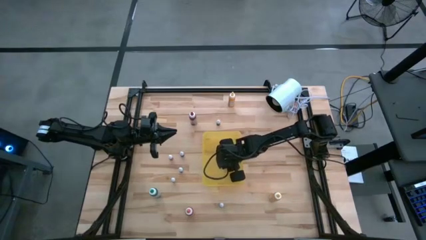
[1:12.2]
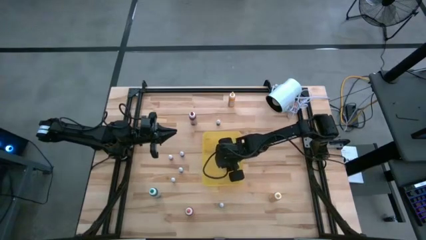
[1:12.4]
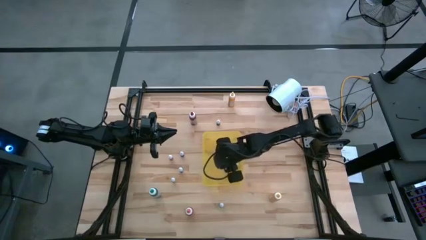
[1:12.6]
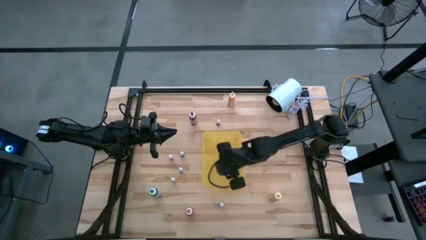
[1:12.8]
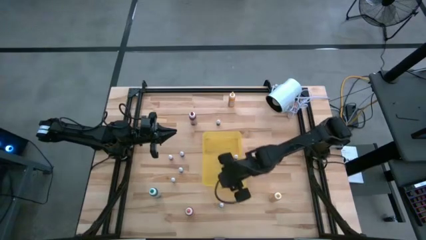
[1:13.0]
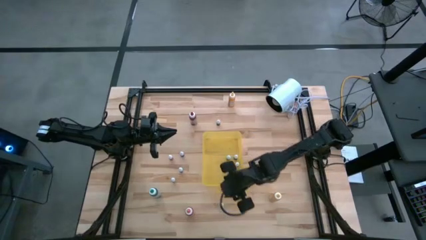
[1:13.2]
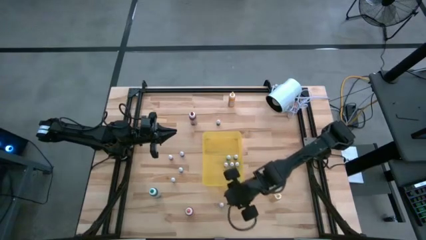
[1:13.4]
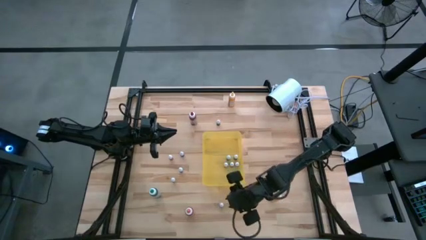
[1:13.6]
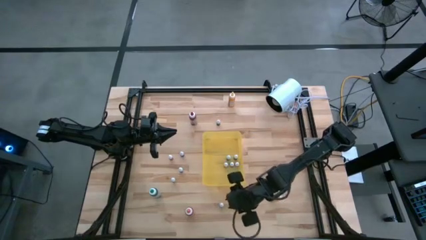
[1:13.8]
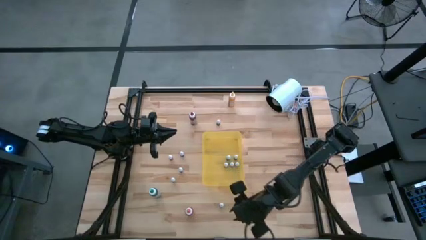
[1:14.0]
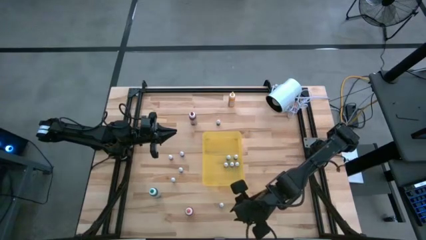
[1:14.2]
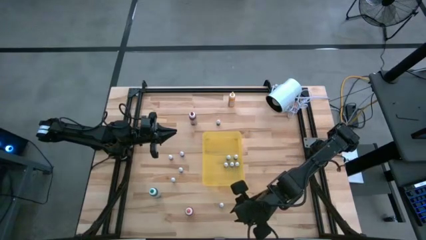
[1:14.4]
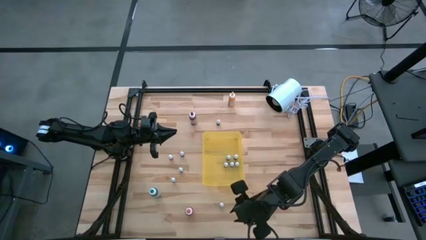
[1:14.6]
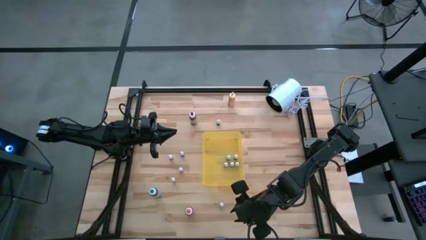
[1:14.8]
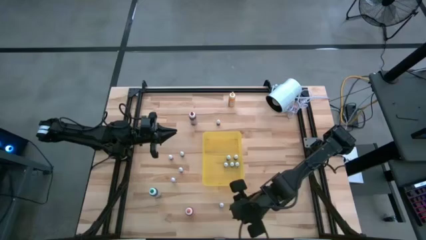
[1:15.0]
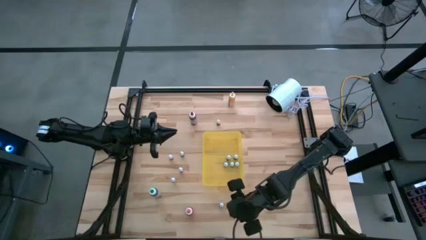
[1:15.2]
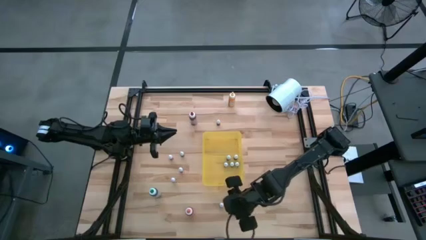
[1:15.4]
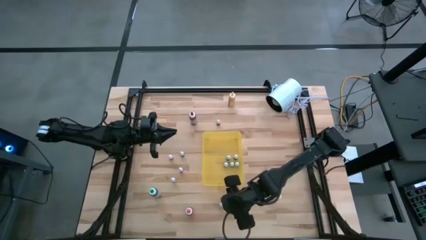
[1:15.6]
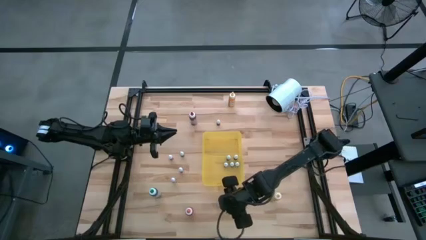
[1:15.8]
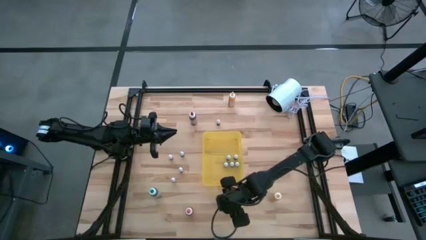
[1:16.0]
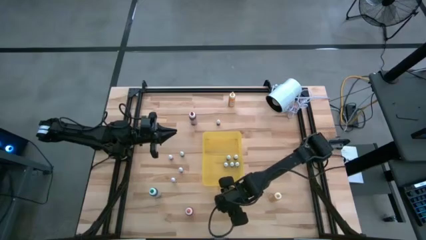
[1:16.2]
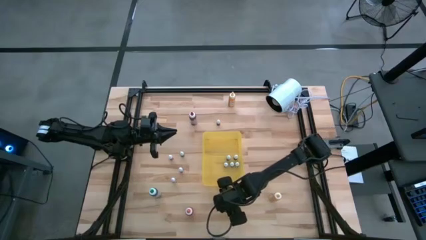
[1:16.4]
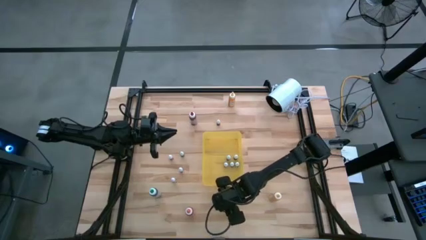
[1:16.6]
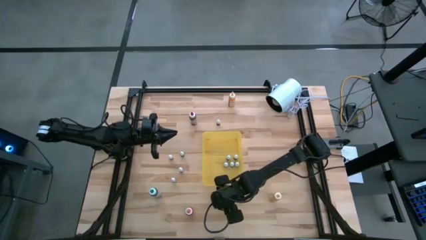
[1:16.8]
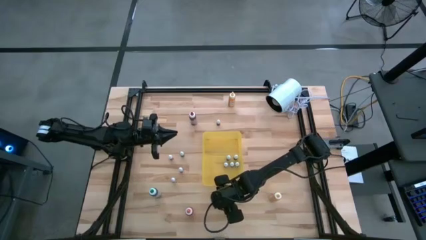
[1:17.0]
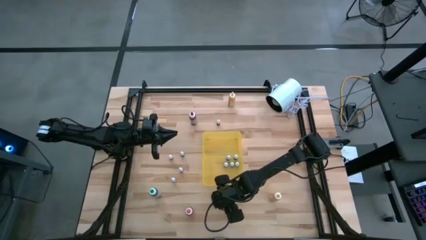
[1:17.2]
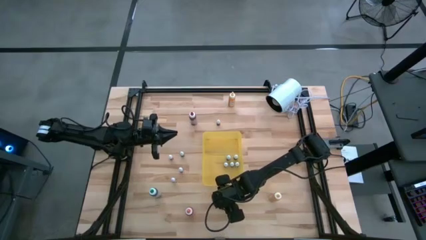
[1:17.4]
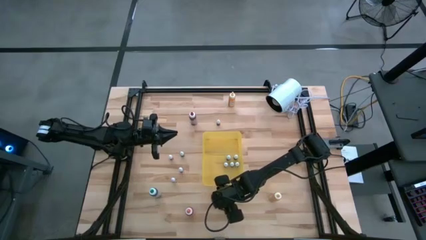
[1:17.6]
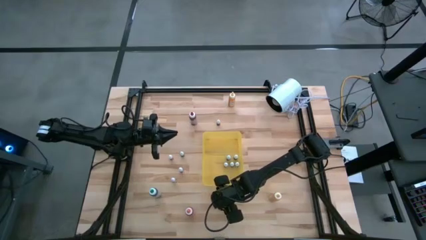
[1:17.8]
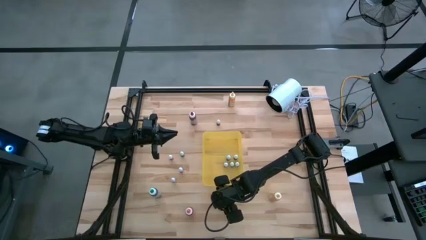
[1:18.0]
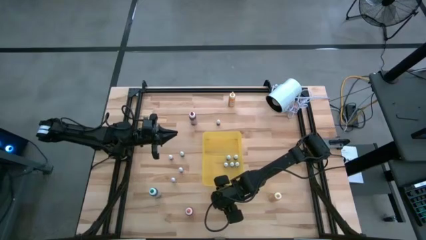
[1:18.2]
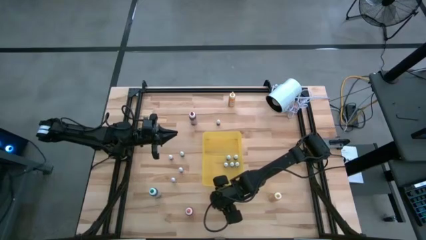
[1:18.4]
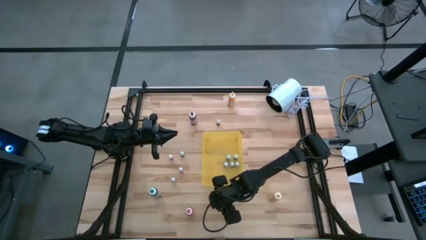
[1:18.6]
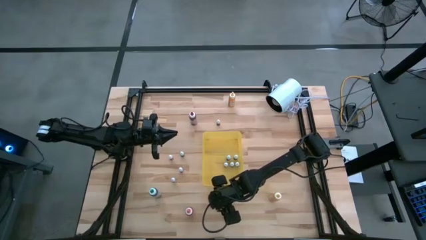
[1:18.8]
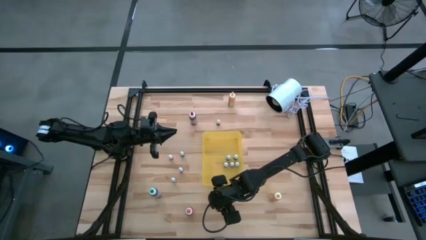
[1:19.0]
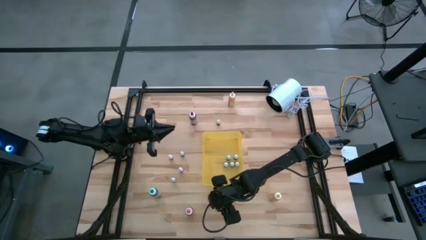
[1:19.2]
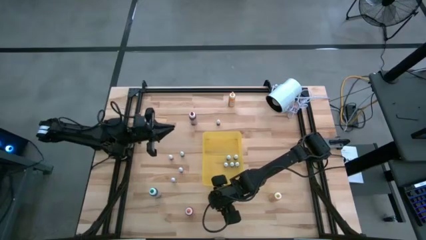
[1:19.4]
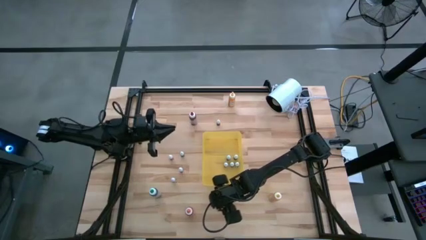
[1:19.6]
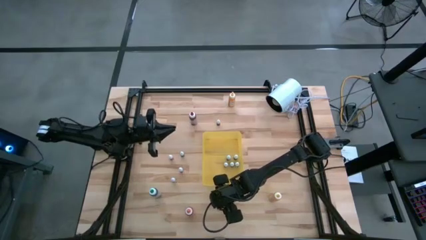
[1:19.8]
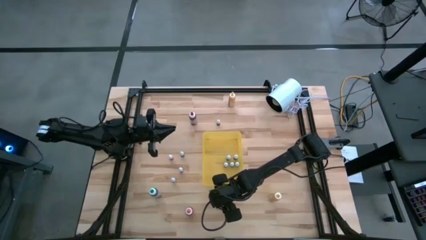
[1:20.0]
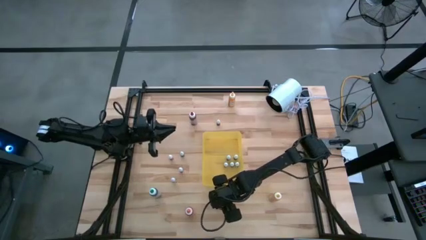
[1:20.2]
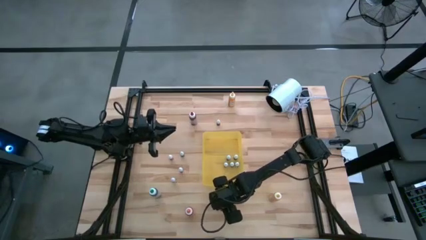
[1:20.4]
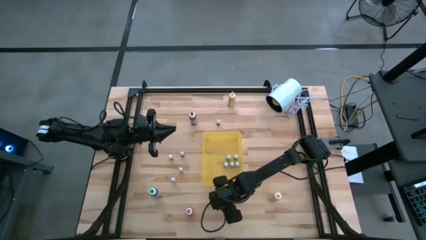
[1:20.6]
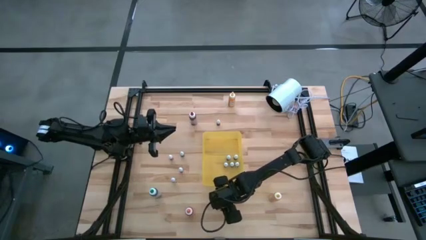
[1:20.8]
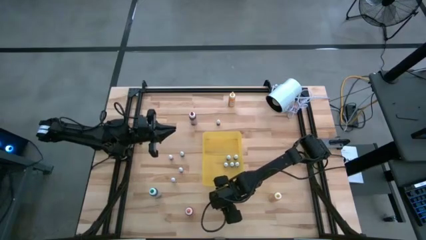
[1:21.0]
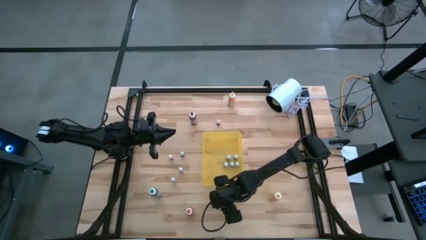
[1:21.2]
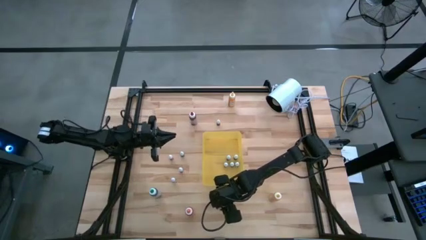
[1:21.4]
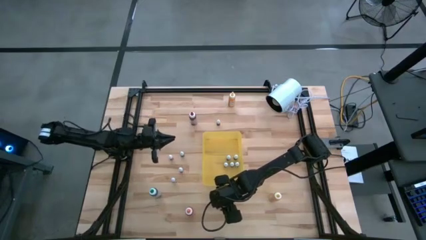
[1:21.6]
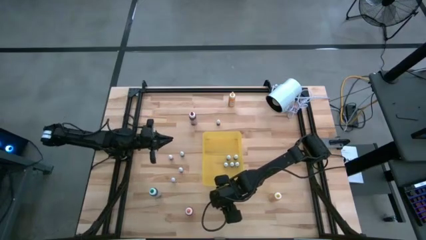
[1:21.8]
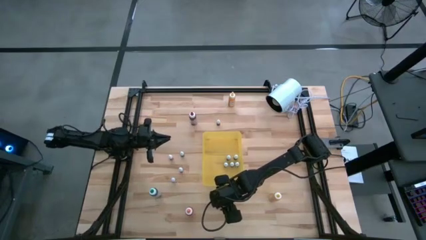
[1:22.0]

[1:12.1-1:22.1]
Task: Pick & Place food coloring
Put the bottom small red food coloring bottle into the yellow bin
